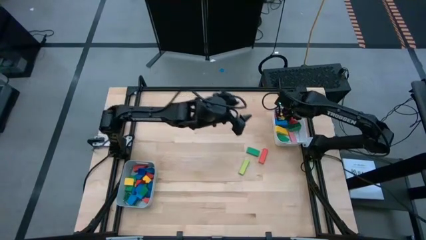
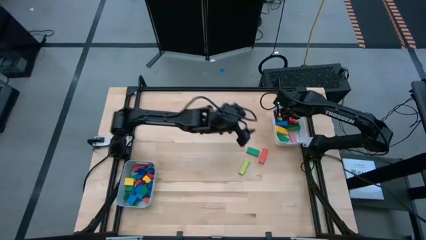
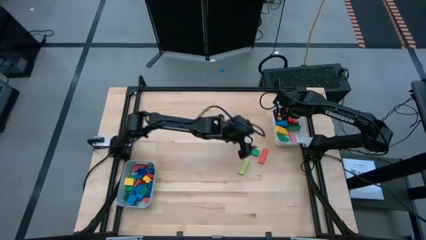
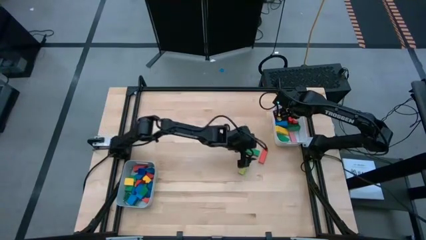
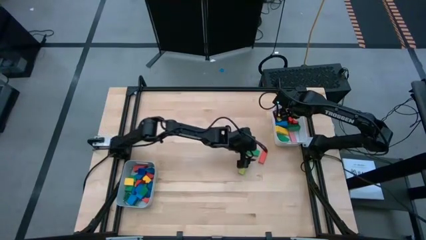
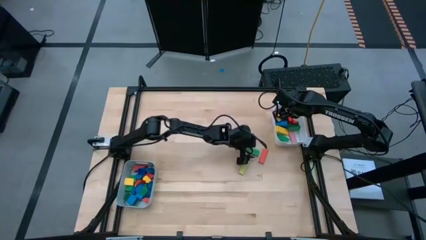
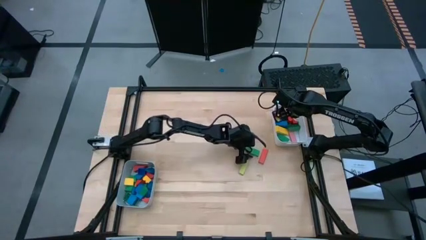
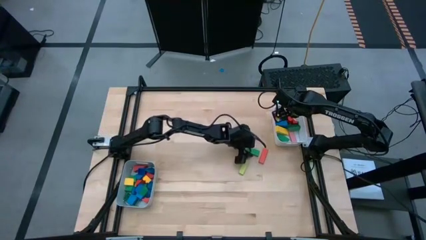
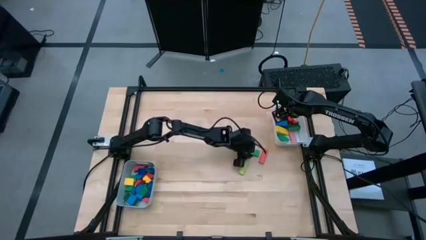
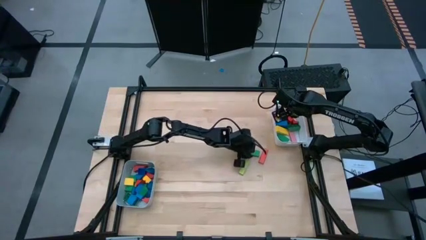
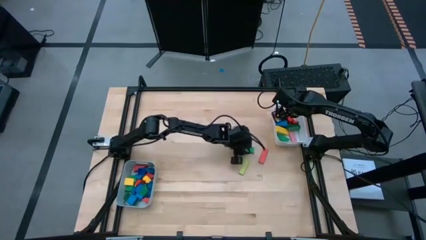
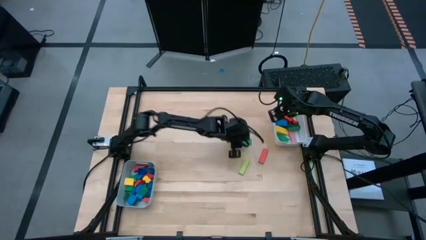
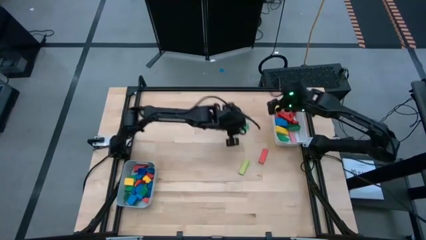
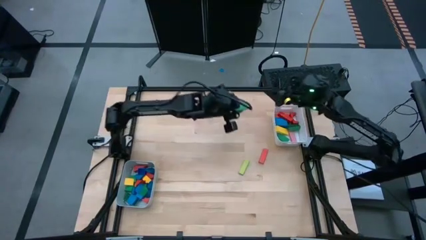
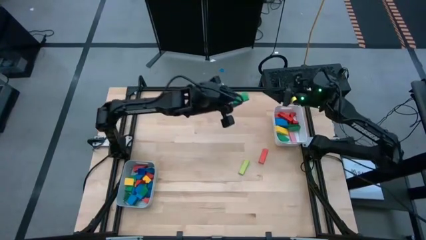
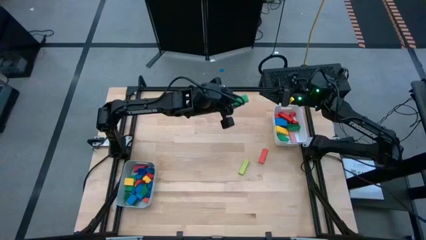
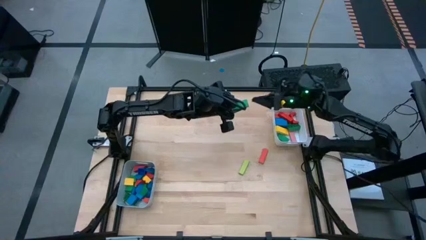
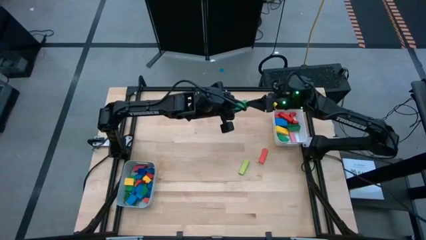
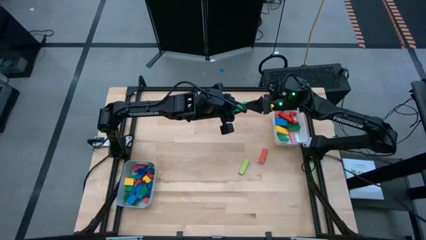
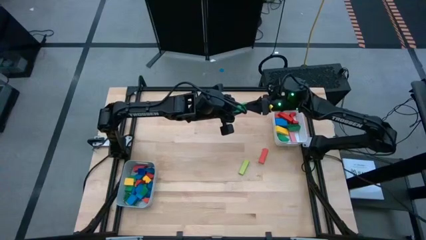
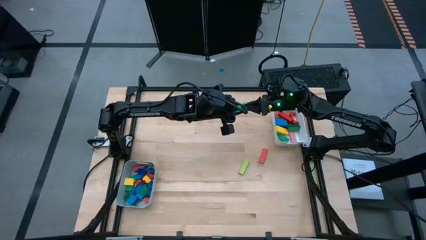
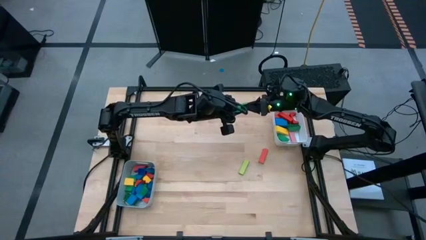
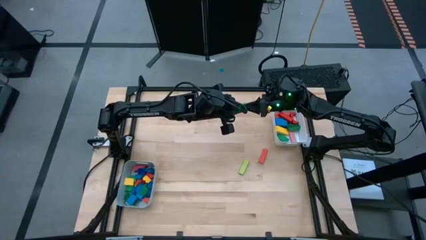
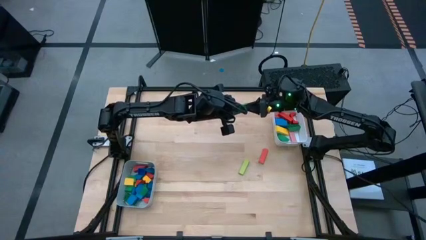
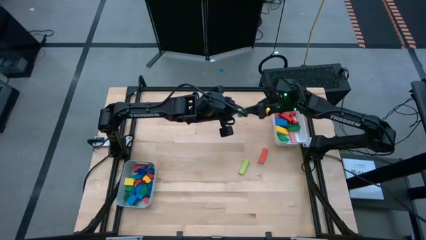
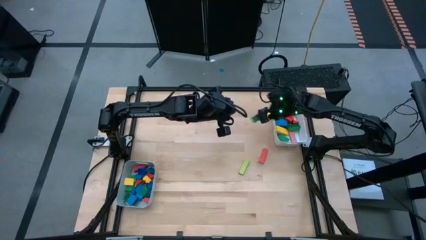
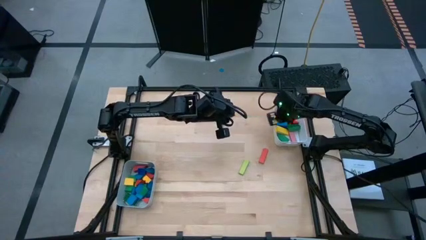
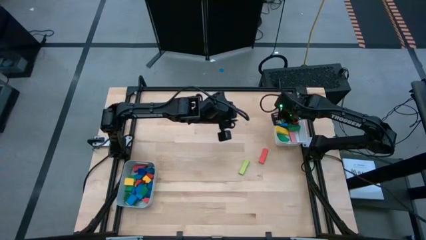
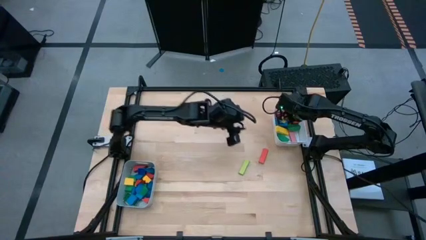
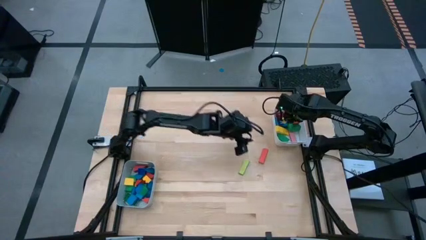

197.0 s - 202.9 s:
Task: Sort blocks by size
Put the green block into the white bin

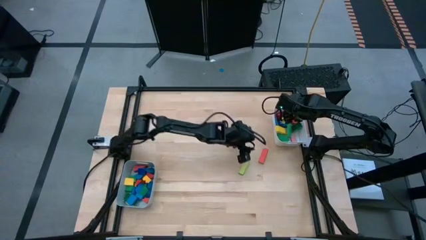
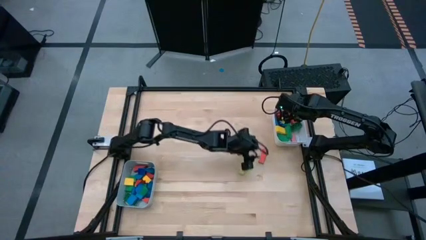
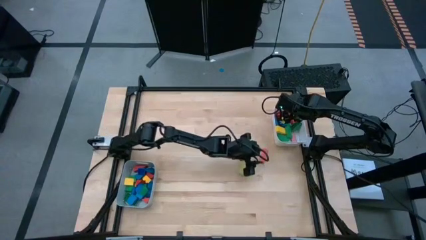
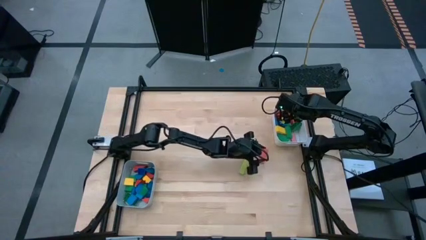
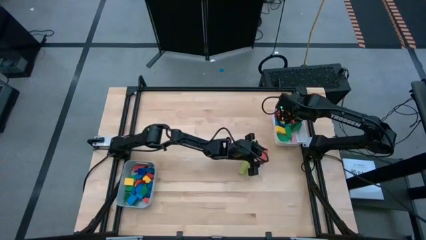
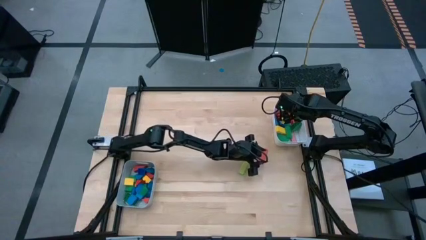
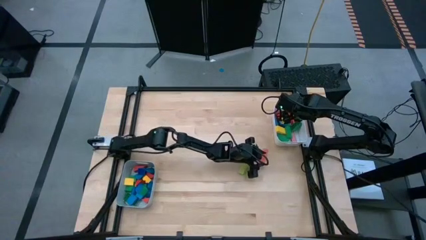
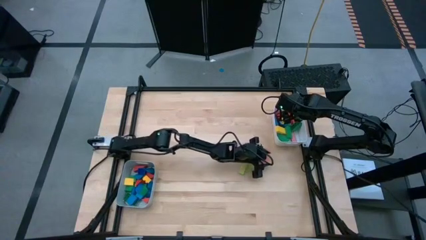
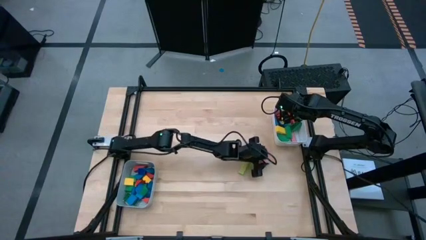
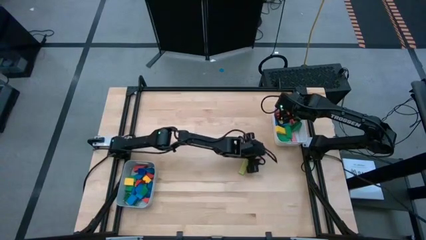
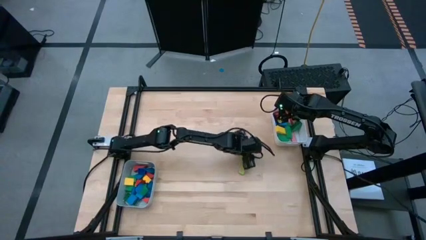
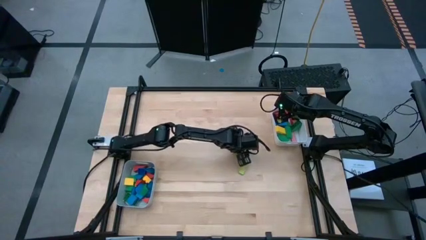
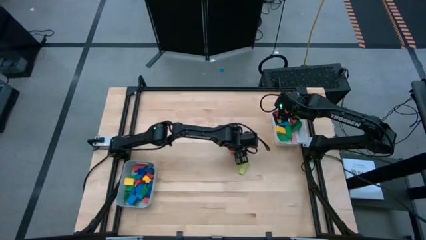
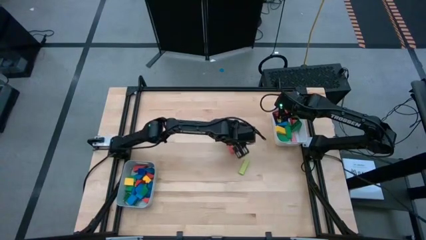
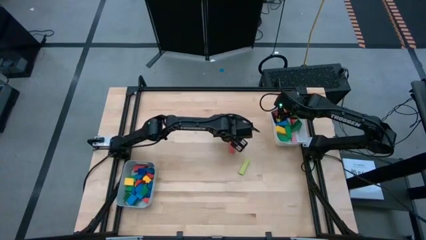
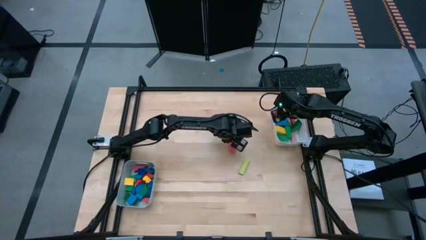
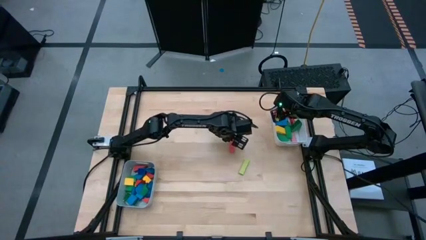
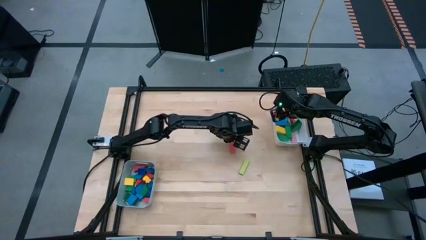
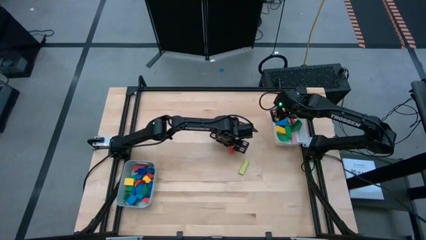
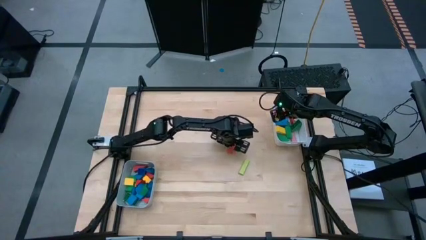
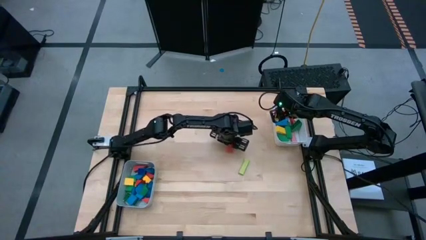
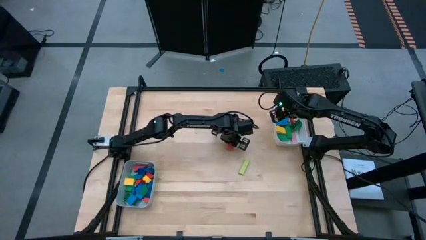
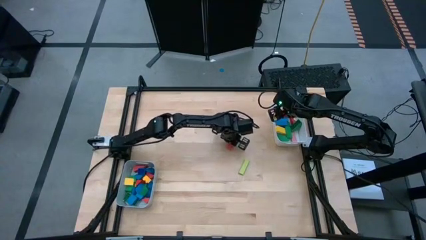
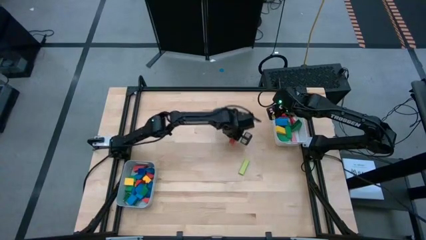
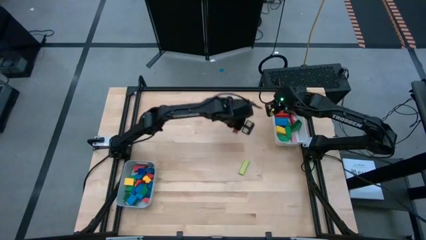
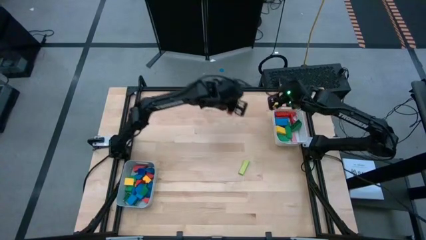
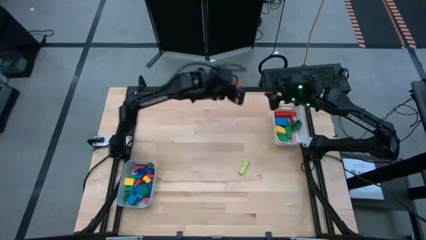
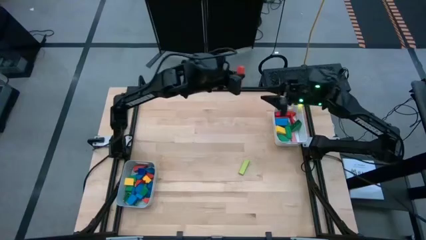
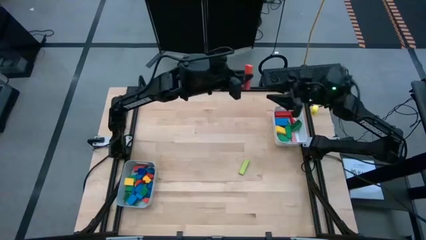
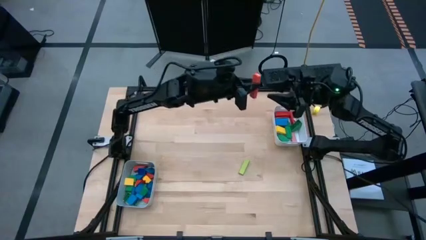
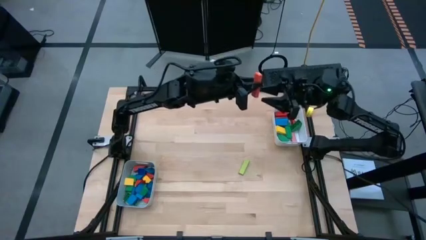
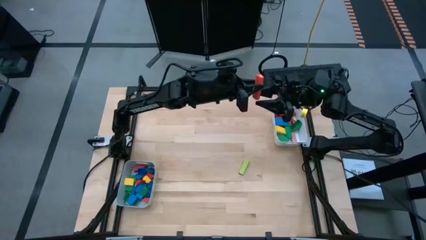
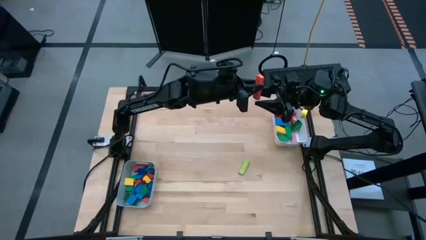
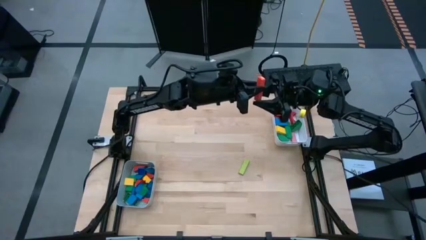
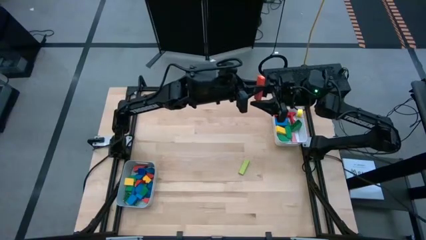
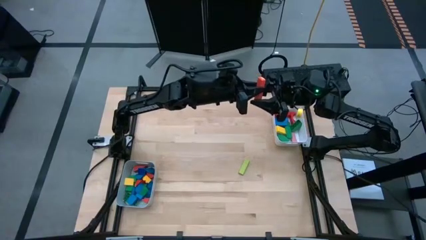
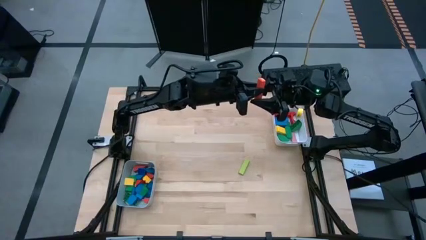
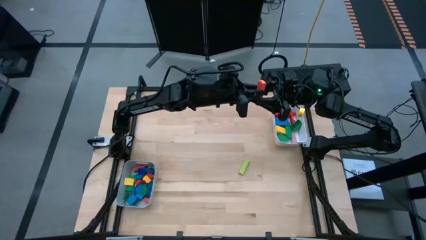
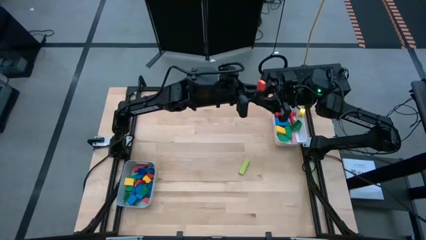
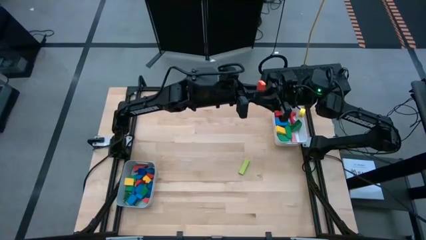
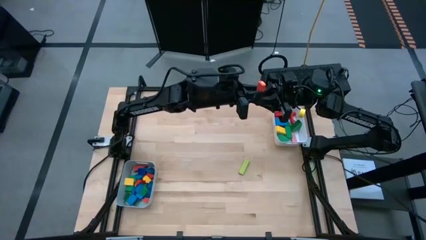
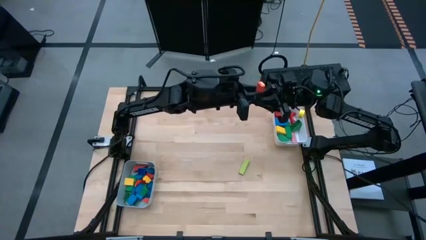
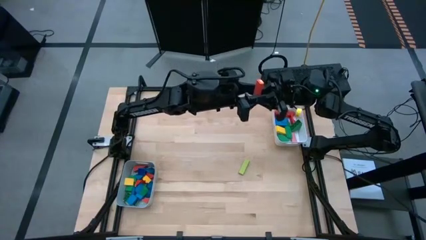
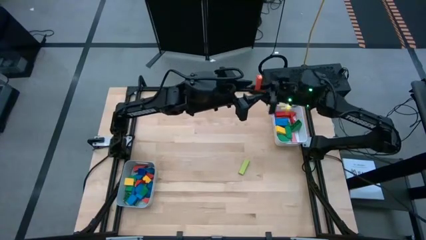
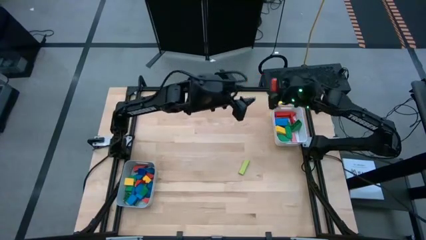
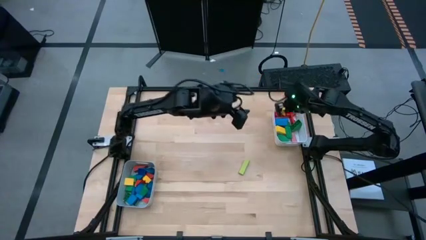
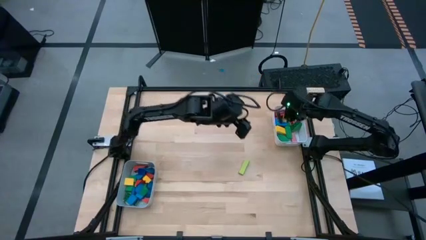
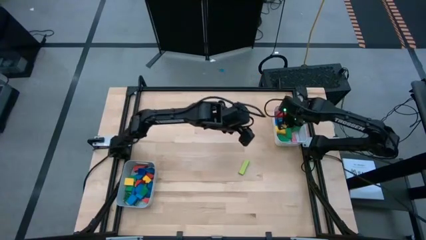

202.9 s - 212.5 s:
Put the orange block into the white bin
